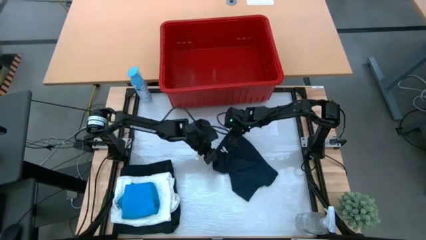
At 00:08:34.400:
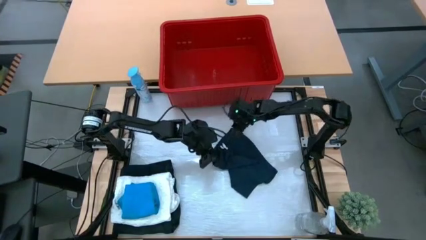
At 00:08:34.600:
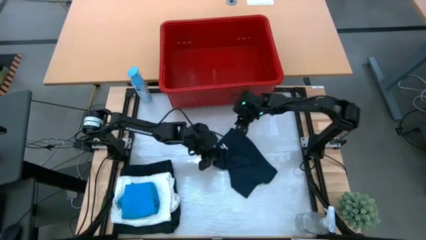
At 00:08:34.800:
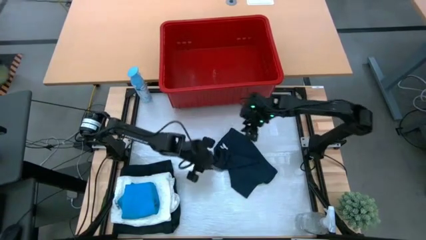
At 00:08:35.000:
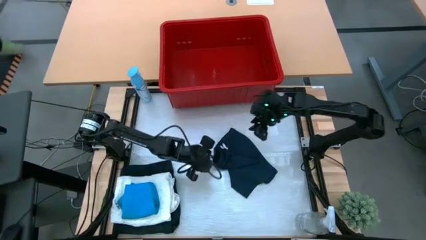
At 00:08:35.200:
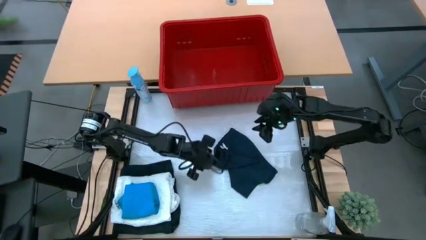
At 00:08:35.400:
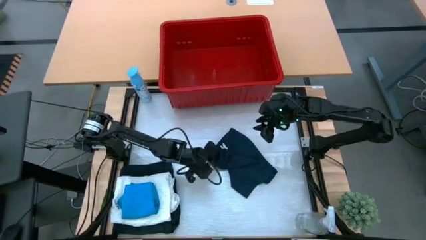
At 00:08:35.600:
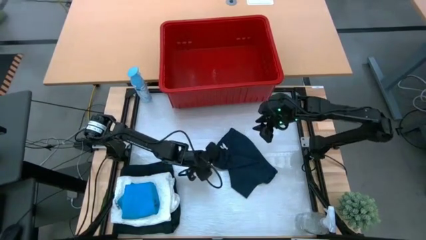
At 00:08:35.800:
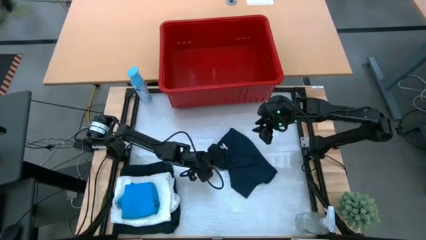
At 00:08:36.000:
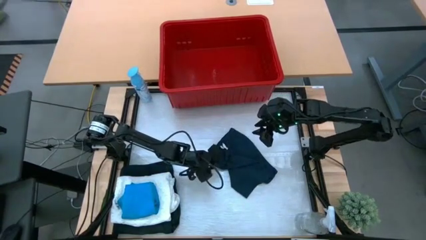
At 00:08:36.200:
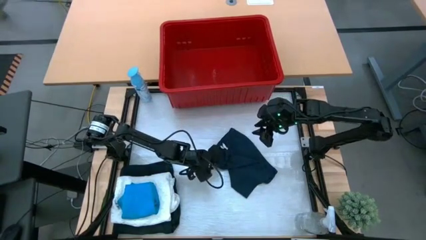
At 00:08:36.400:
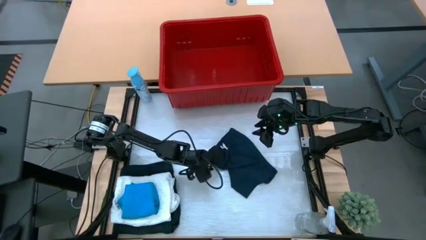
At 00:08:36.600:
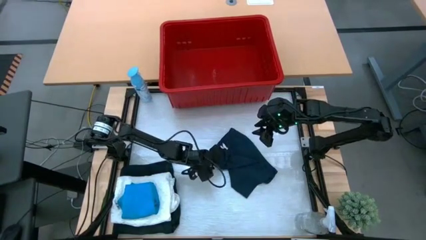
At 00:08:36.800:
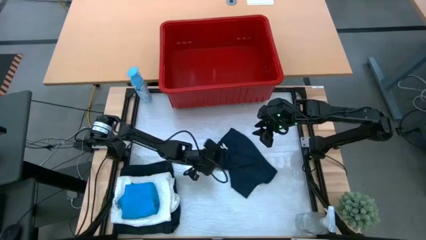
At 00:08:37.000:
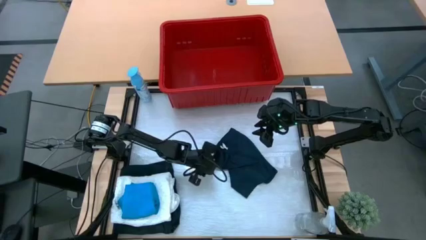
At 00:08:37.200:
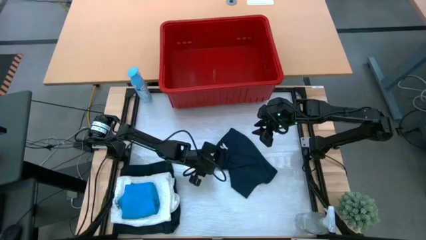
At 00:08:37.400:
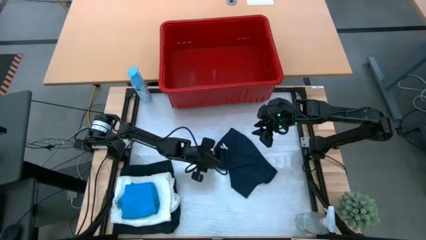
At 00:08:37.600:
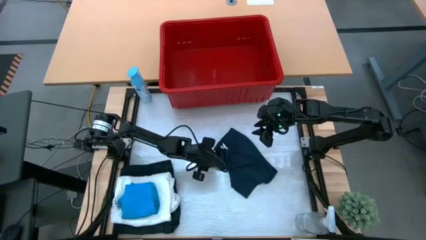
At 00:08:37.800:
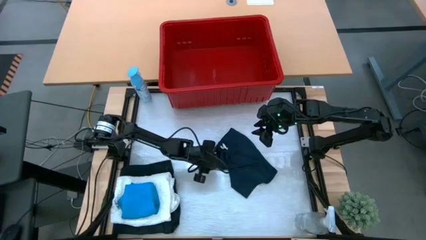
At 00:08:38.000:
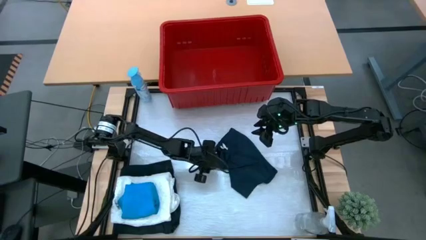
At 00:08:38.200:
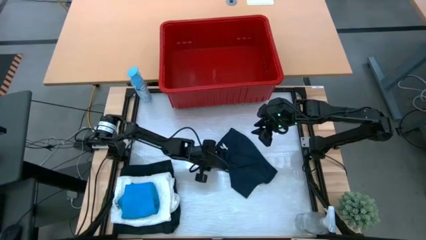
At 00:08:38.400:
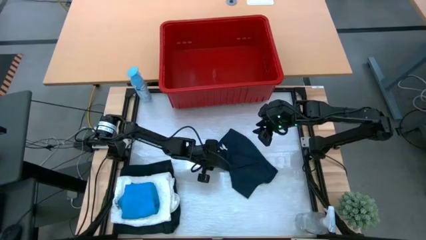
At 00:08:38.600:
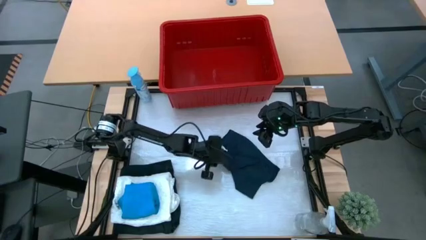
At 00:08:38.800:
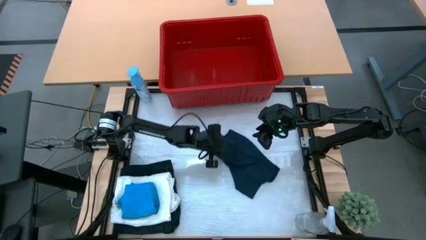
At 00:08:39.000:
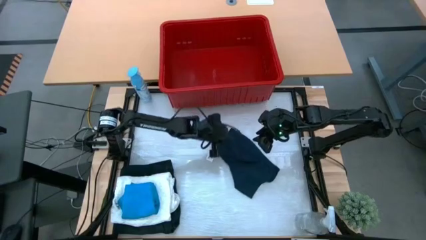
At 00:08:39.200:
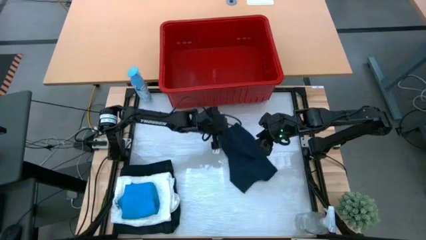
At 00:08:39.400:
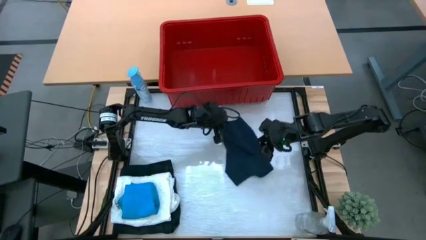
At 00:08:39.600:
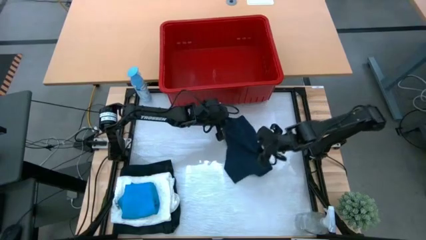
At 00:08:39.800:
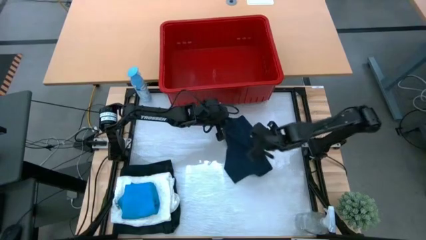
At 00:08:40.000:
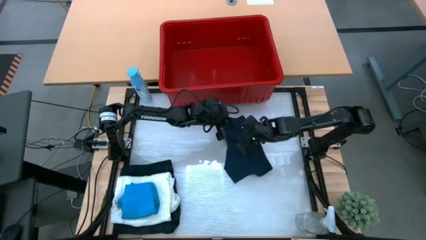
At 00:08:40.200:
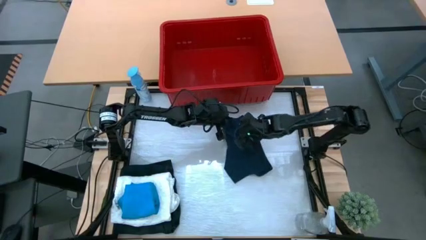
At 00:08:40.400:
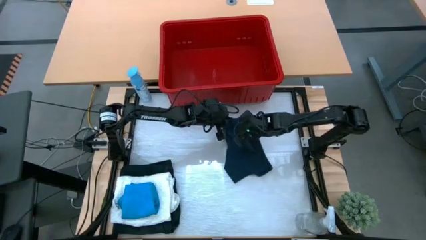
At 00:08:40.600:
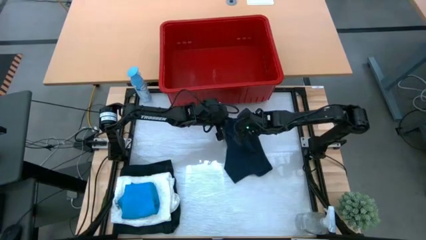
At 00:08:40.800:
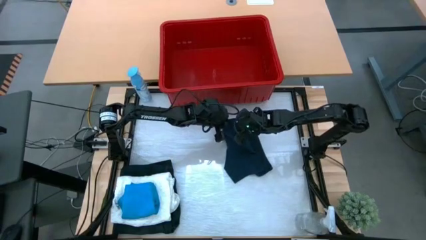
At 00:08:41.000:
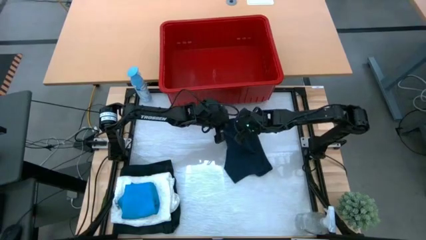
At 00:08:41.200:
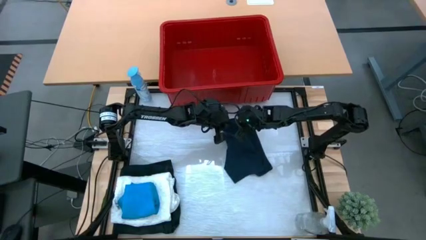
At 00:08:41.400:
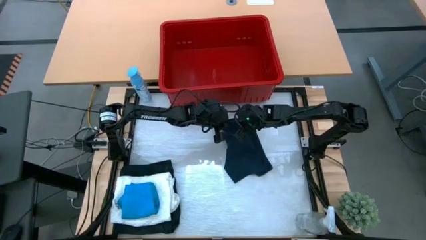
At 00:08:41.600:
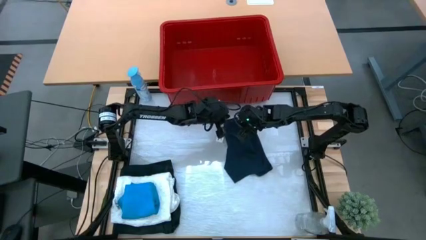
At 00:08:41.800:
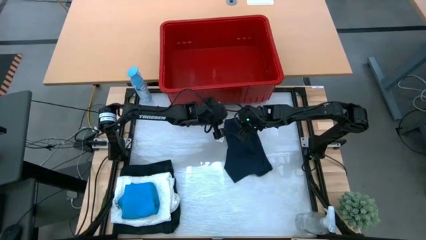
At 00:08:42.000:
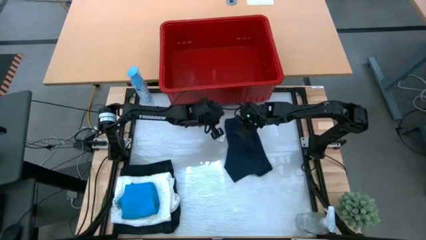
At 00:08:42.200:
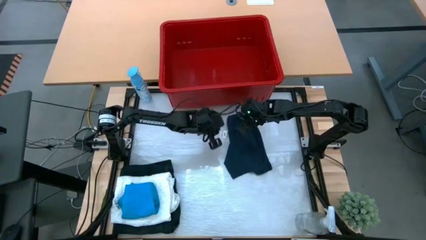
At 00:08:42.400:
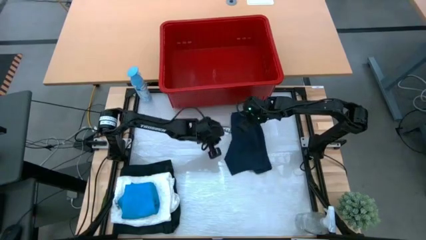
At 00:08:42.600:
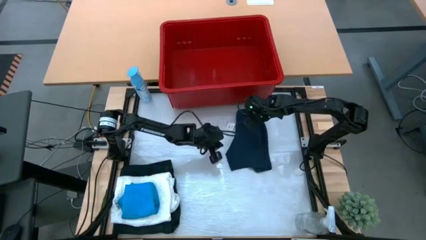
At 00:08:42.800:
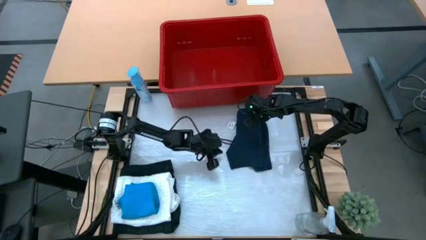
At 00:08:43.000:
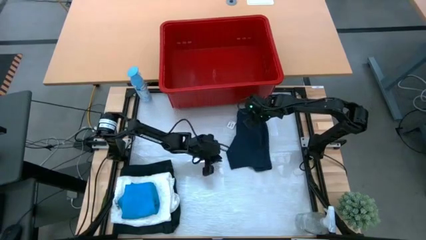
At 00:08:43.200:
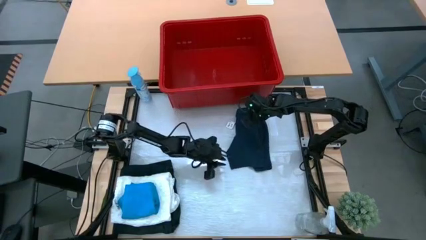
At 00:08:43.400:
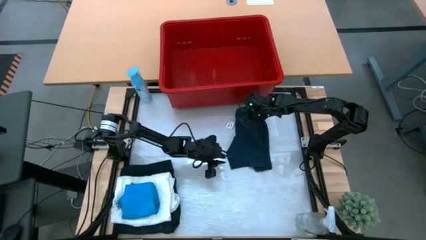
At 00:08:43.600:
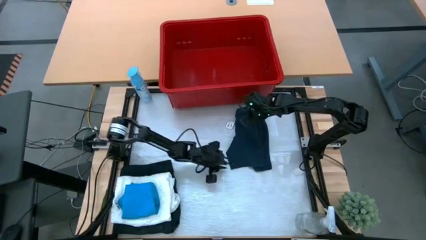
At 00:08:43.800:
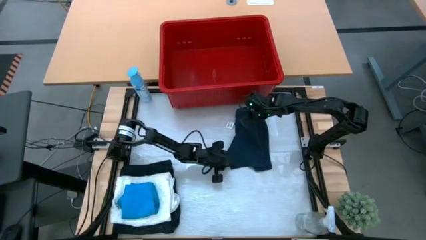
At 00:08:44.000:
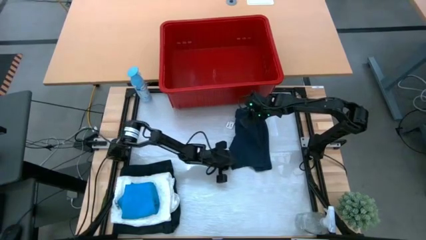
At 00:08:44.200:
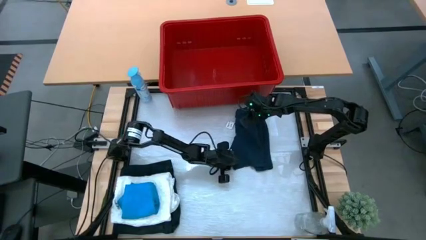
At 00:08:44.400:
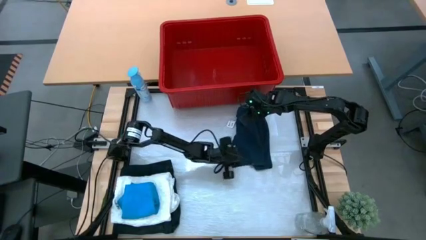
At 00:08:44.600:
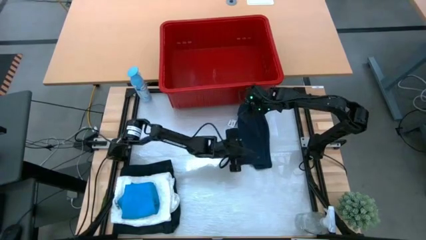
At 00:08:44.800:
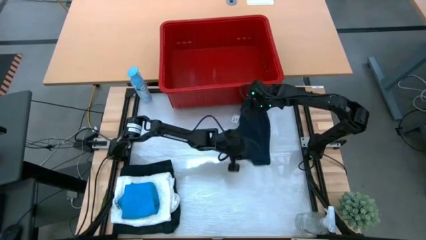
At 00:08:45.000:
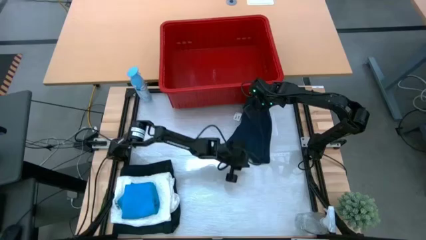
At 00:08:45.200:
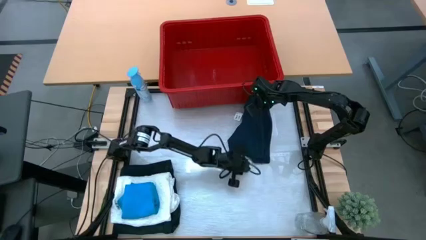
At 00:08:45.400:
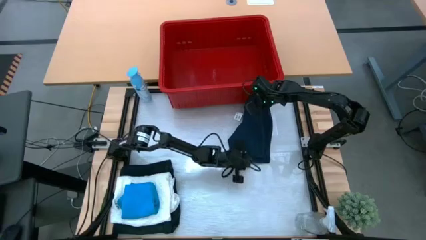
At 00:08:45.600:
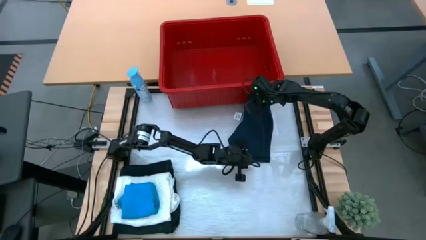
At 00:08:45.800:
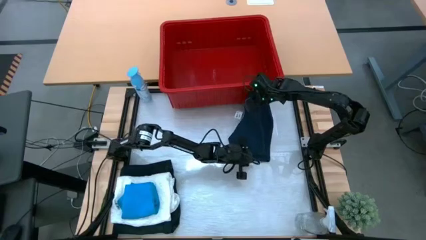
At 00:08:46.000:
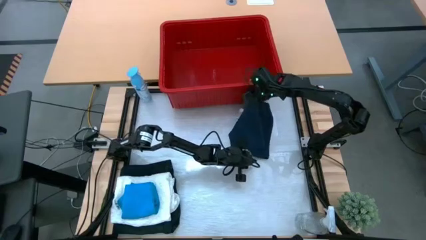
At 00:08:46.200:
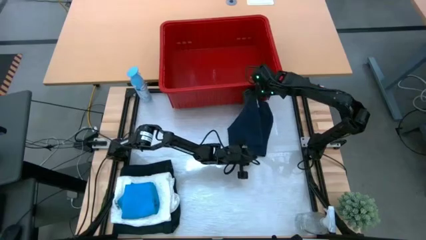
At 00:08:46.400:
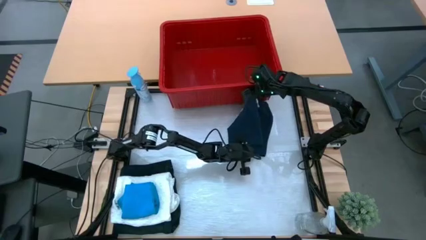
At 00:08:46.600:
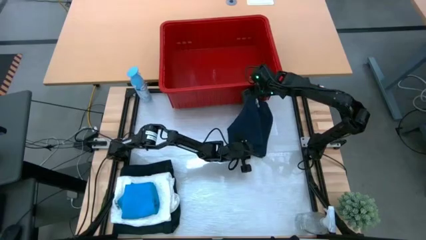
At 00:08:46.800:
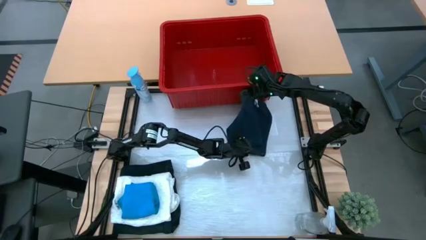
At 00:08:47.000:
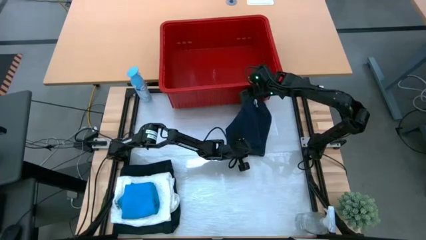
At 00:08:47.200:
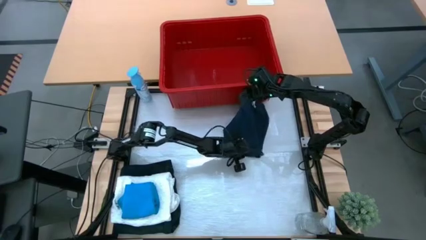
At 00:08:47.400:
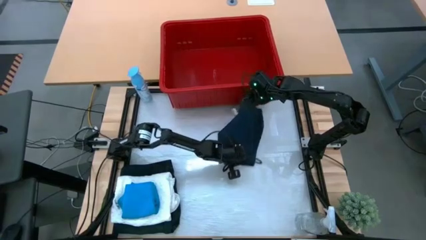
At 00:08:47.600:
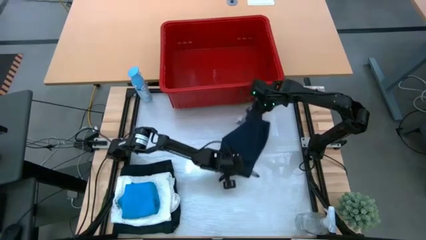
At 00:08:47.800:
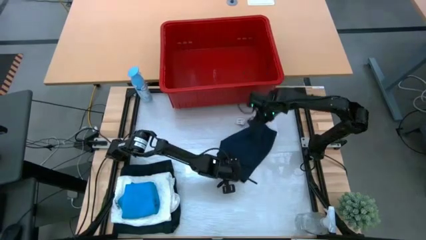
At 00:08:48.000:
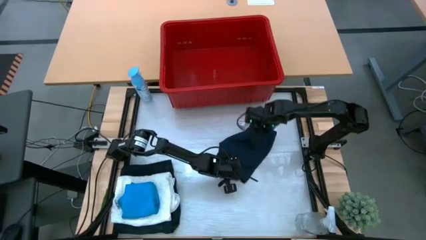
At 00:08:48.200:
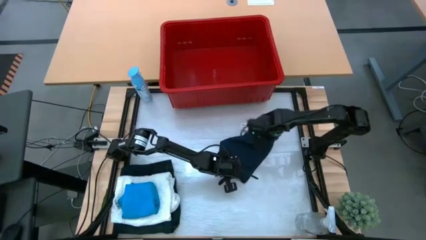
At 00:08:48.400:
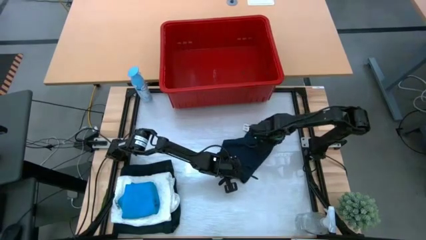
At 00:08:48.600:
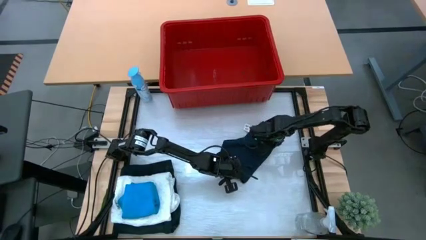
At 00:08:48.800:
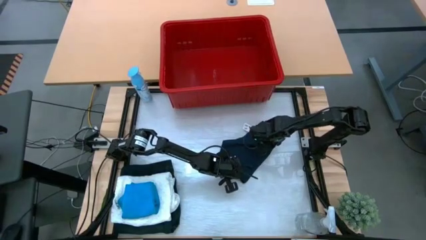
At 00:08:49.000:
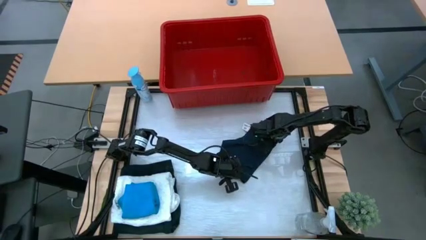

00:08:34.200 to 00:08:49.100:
Task: Fold Laundry from Bin
Fold the gray shorts from the red bin

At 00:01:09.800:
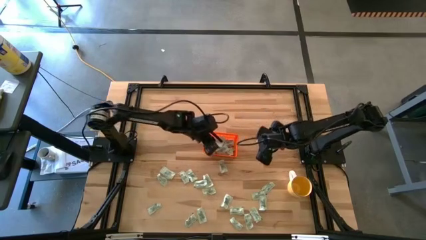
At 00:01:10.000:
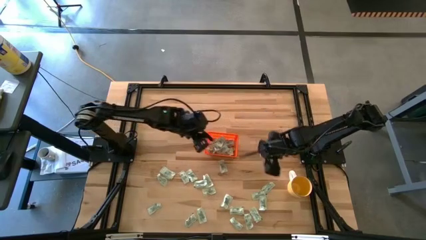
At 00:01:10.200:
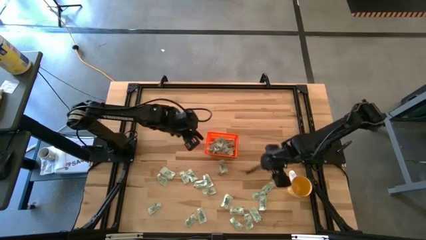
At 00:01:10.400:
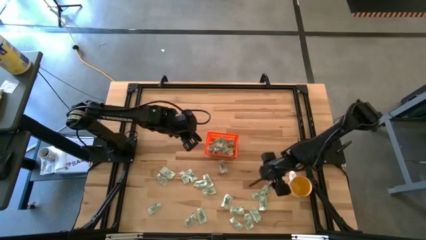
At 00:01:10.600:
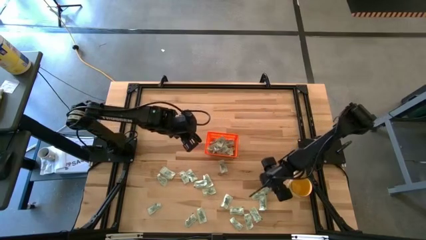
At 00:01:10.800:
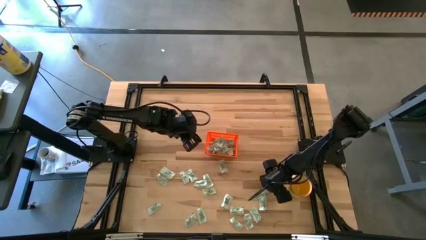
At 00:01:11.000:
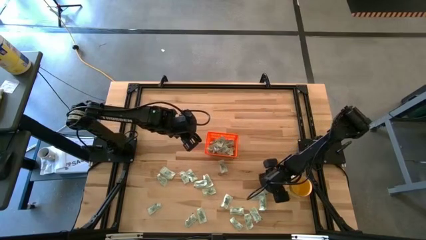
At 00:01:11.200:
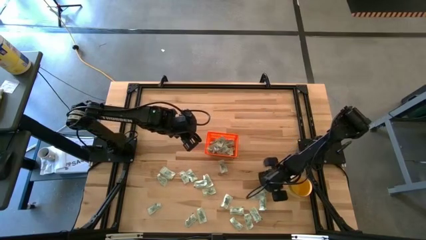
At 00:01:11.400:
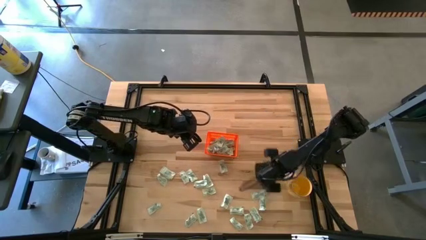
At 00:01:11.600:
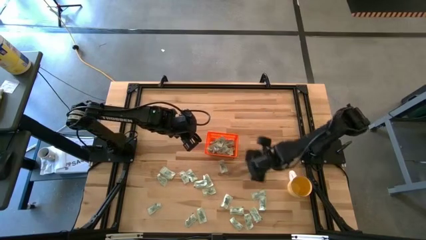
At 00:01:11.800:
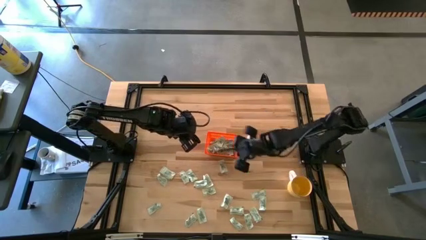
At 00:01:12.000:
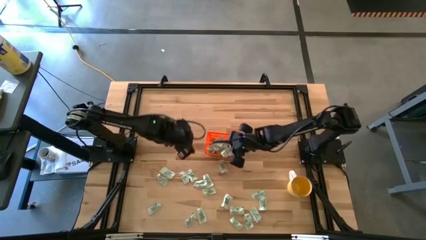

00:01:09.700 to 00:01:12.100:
Task: Pick and place Stevia / Truvia into bins
Put the light green stevia packet into the orange bin
